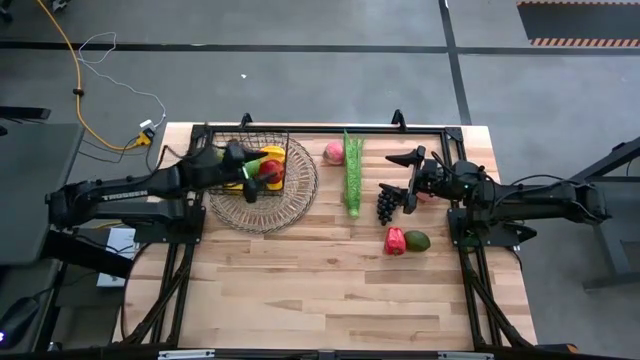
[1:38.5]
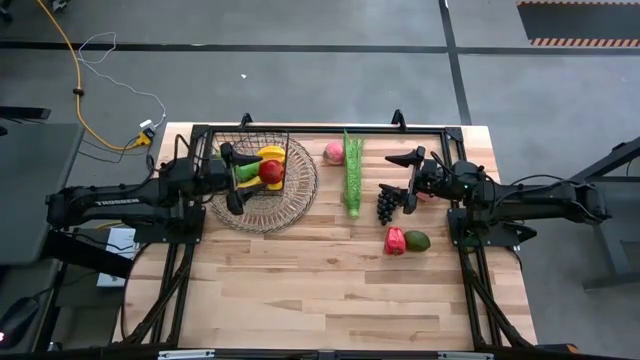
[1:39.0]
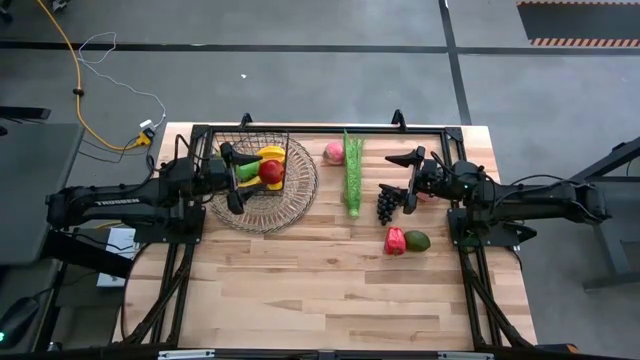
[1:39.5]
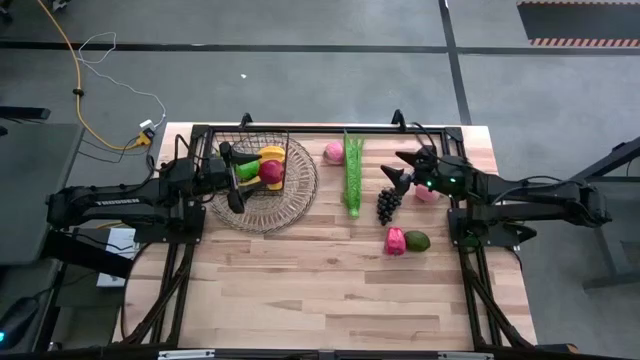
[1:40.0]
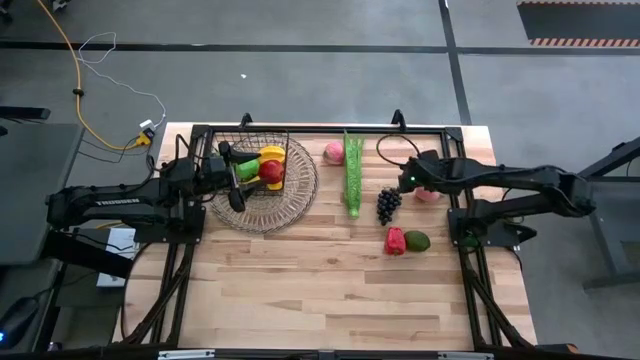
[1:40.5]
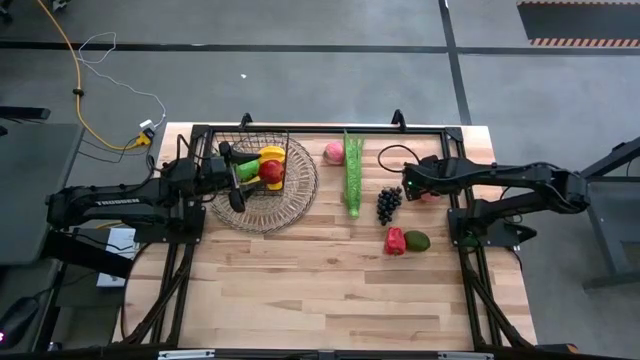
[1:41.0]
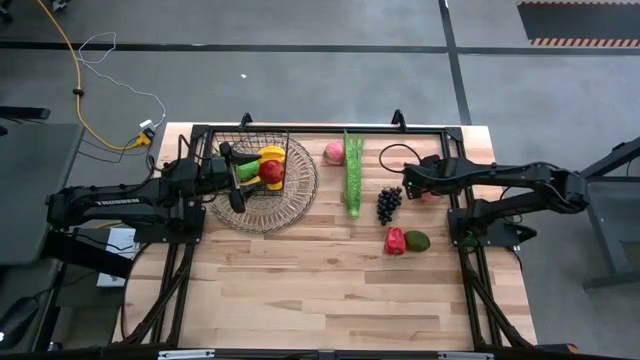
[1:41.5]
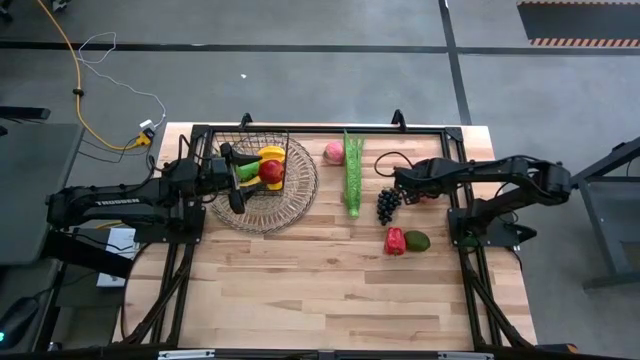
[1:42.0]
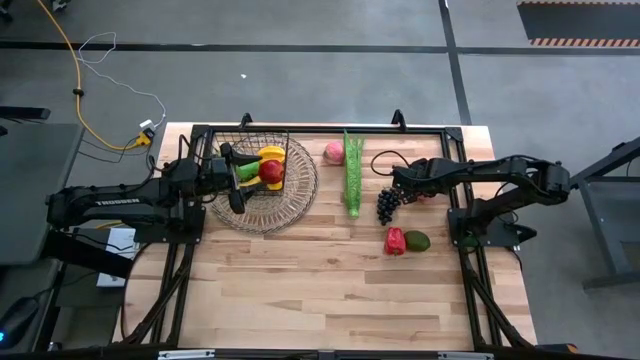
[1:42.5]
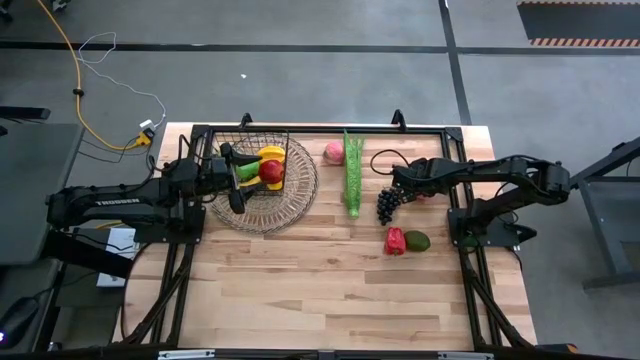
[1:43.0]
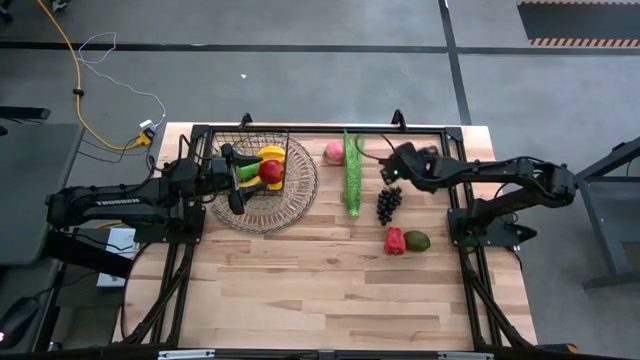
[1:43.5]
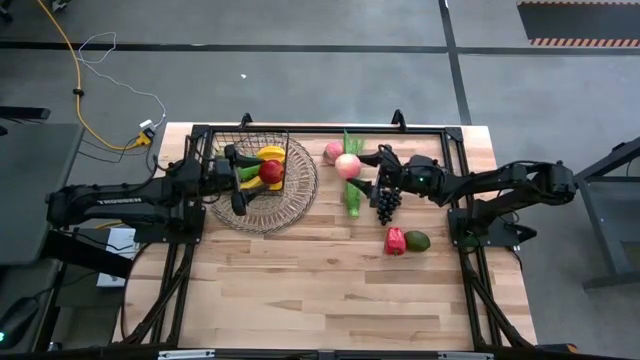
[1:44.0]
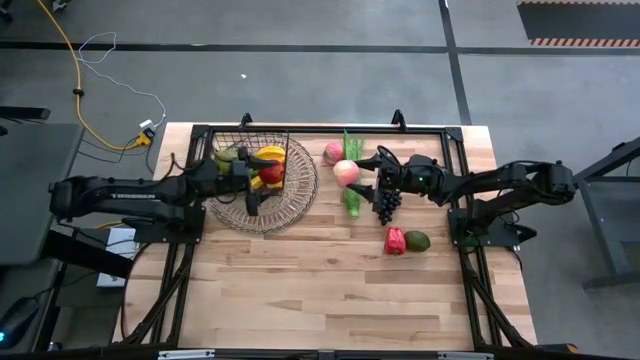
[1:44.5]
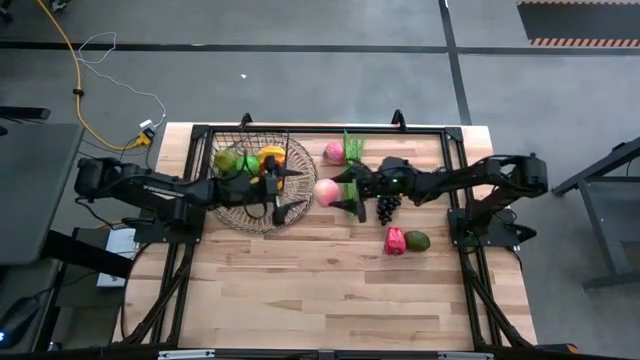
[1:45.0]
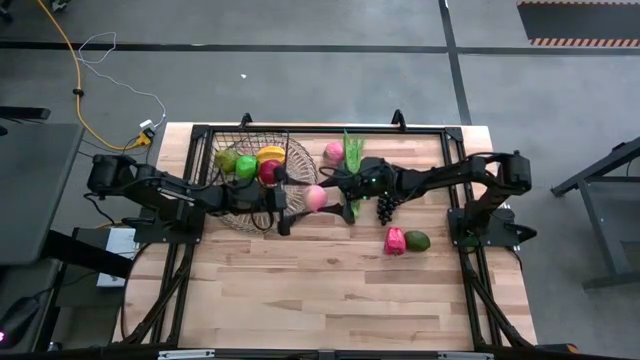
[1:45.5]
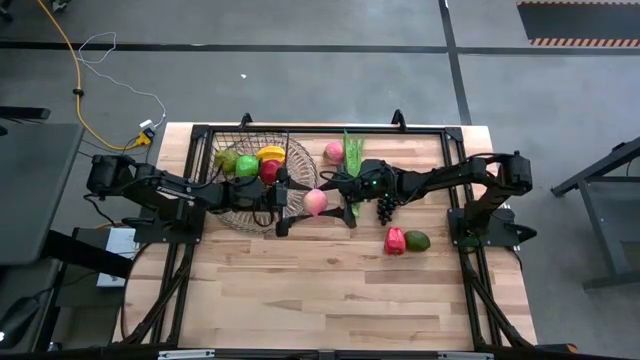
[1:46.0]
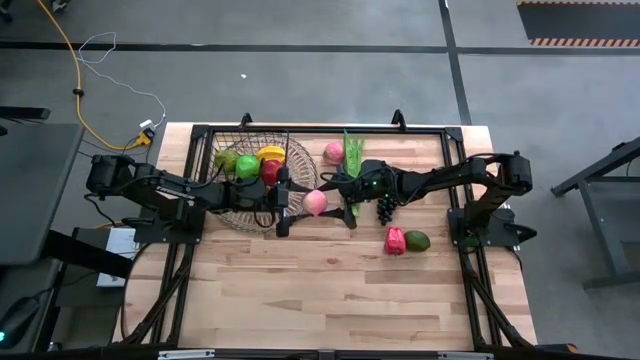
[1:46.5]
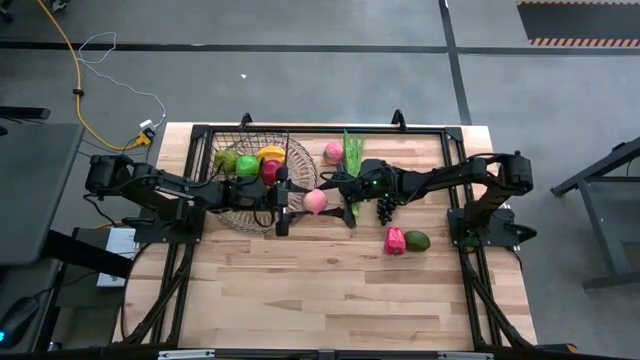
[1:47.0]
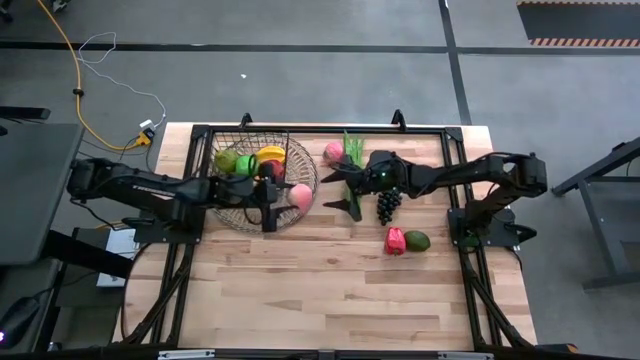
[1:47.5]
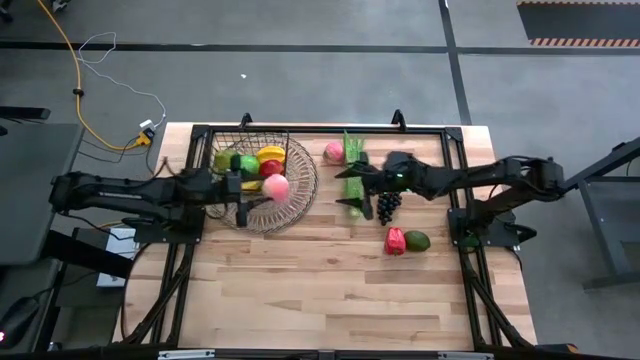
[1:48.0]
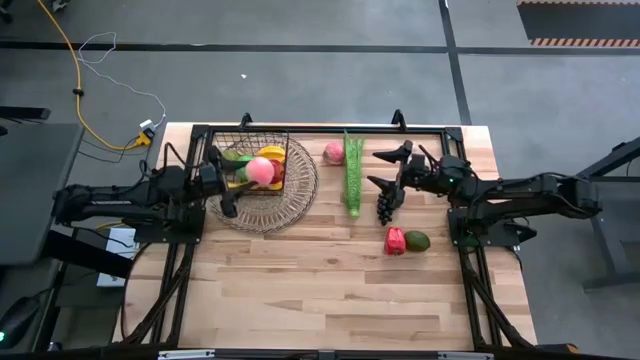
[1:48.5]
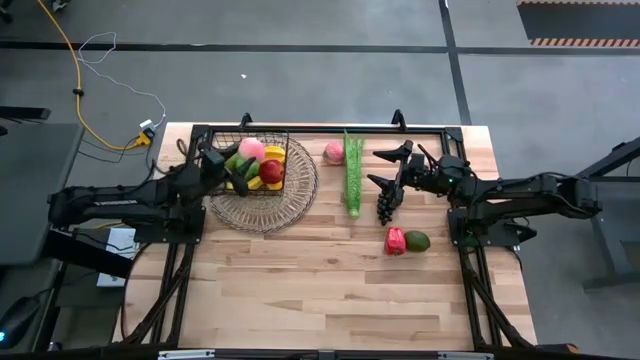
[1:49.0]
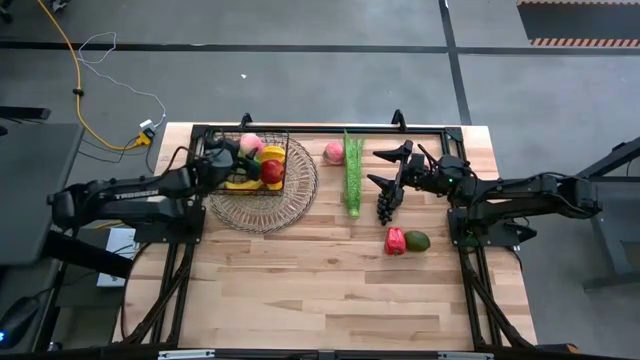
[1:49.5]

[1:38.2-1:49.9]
Task: Build produce basket
Put the bottom pink peach into the black wire basket

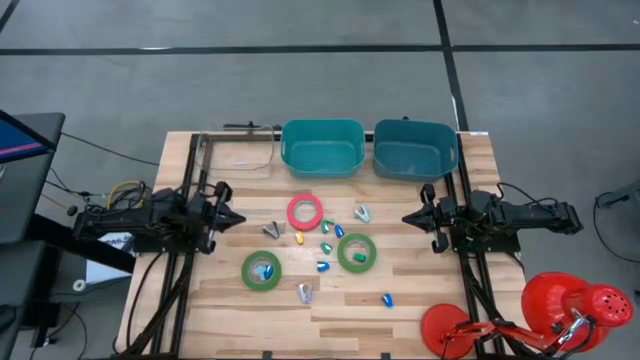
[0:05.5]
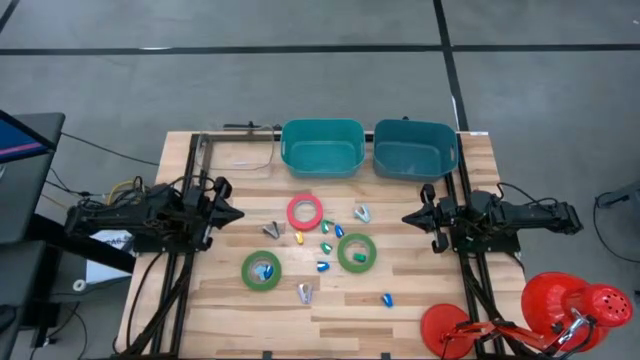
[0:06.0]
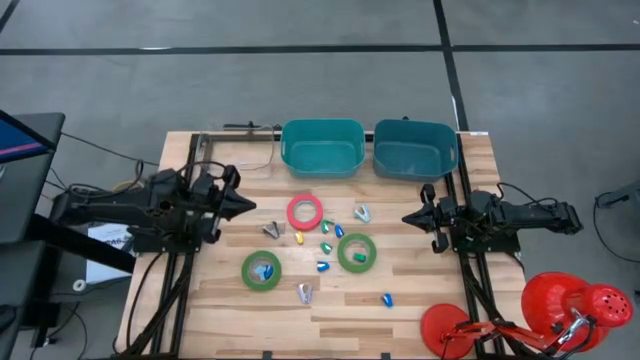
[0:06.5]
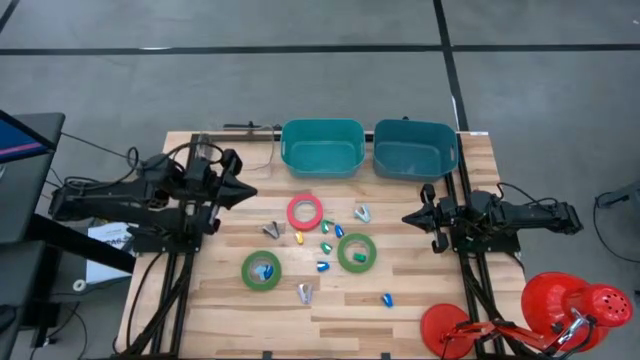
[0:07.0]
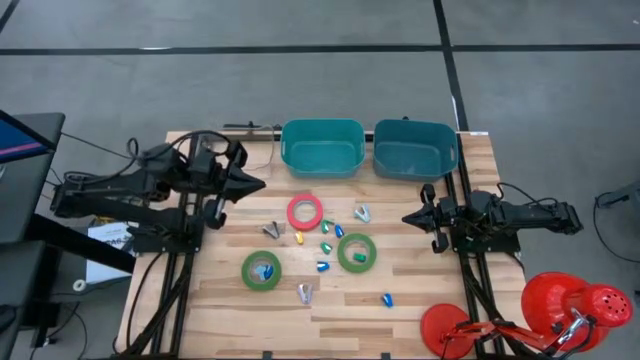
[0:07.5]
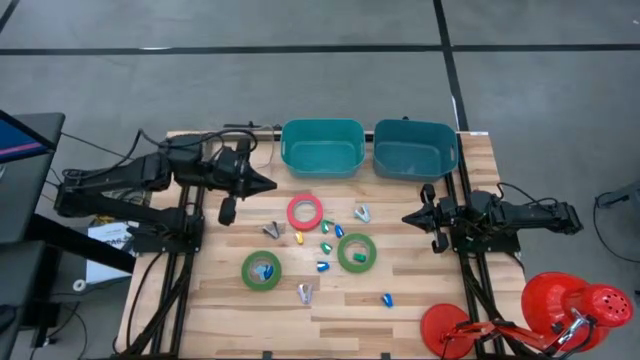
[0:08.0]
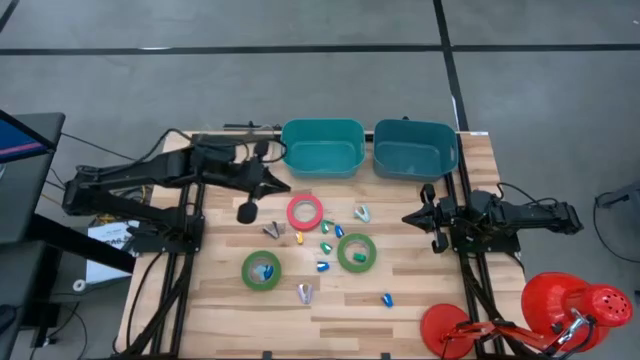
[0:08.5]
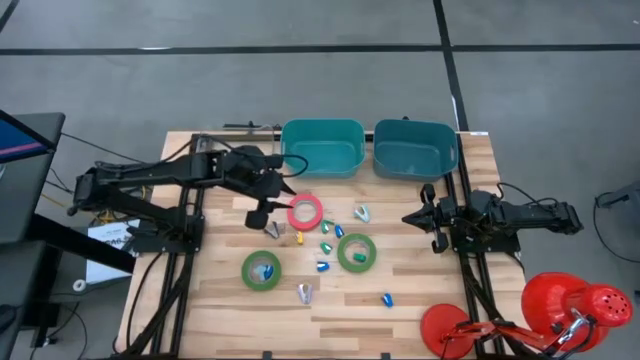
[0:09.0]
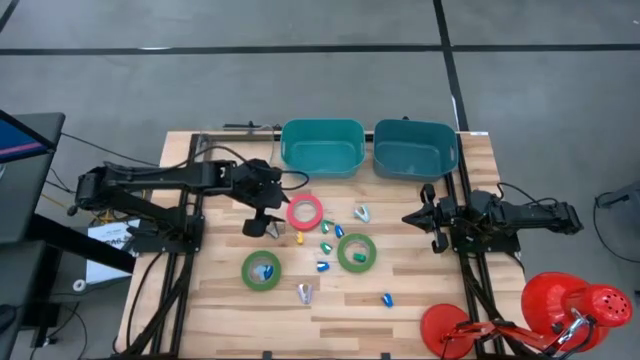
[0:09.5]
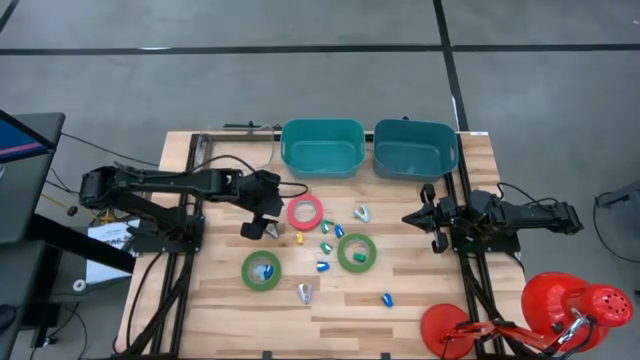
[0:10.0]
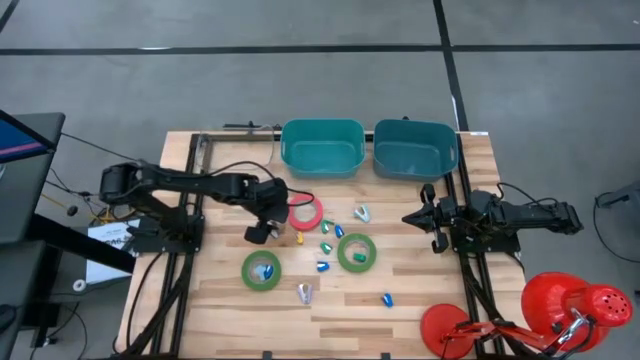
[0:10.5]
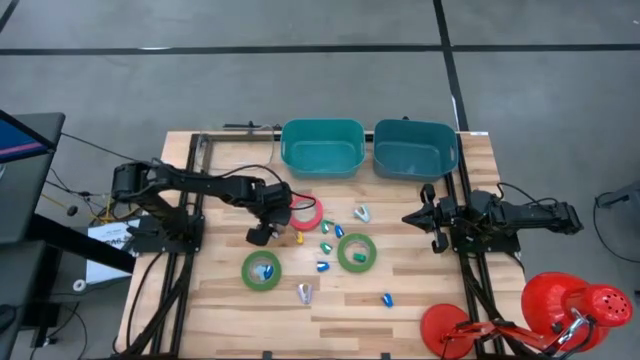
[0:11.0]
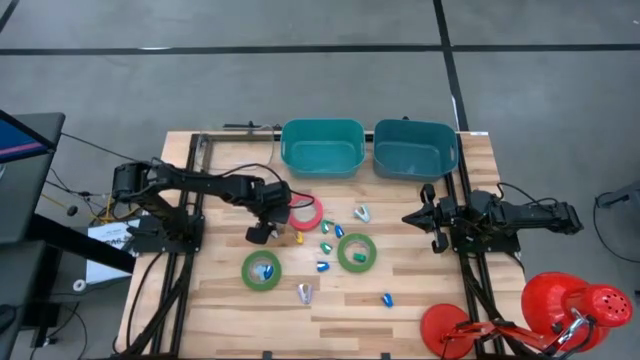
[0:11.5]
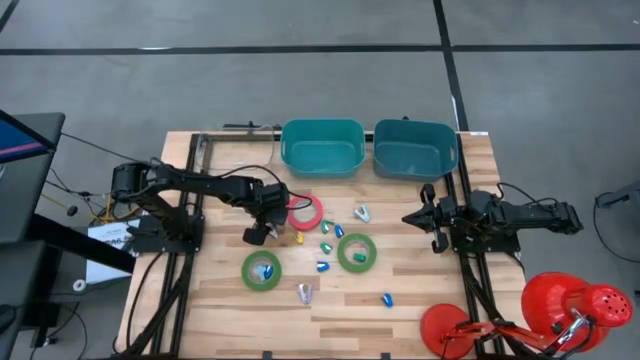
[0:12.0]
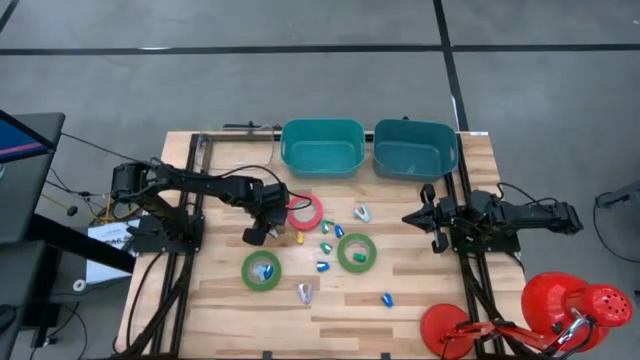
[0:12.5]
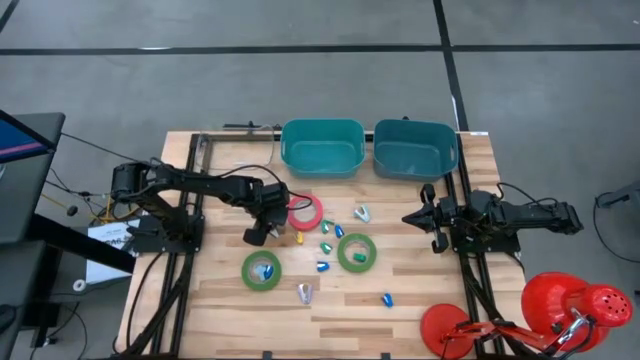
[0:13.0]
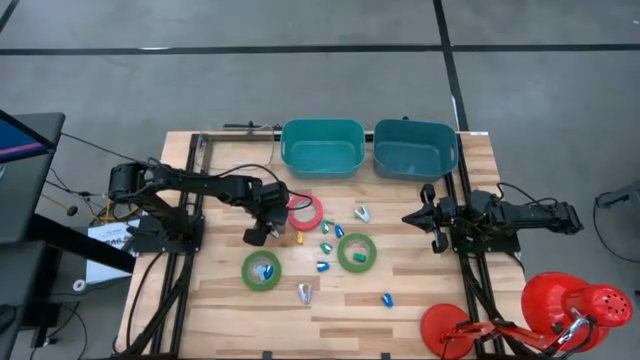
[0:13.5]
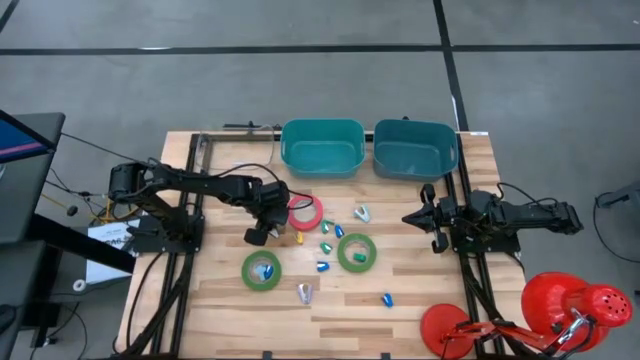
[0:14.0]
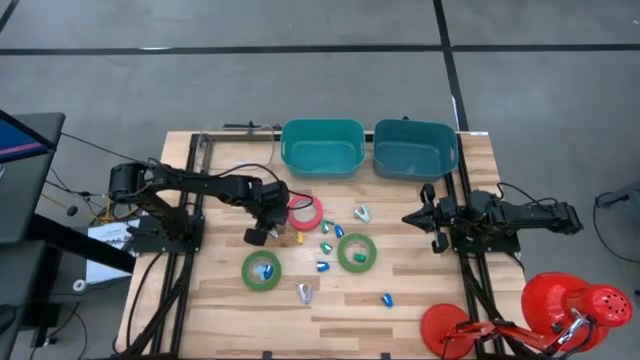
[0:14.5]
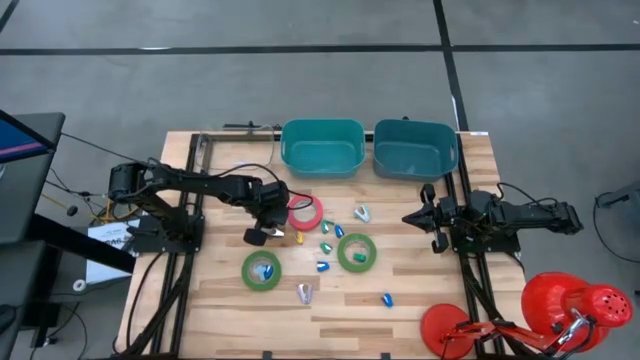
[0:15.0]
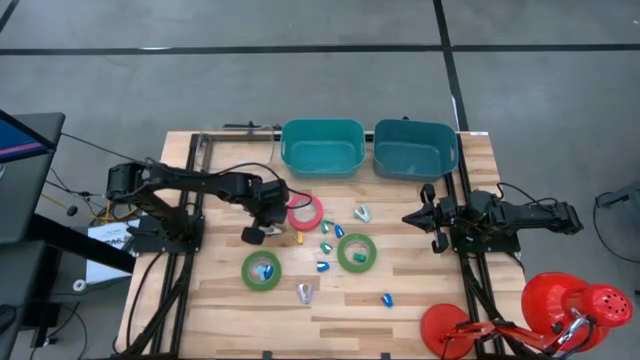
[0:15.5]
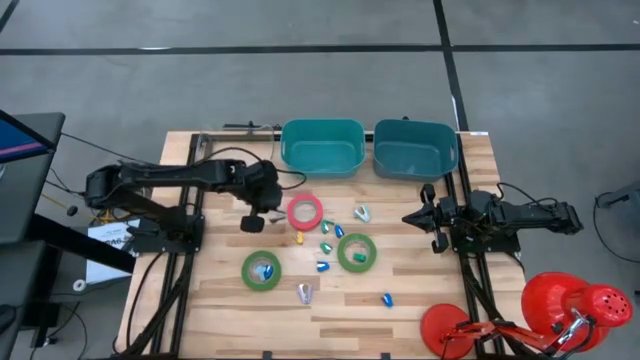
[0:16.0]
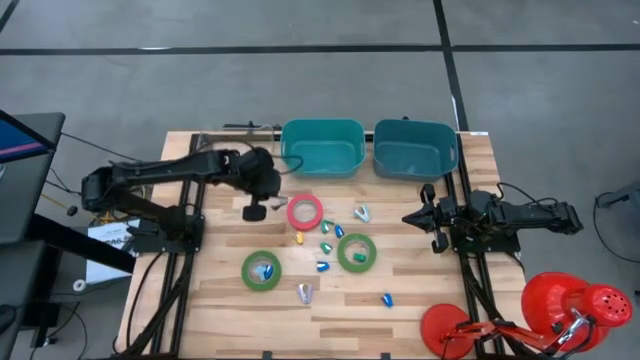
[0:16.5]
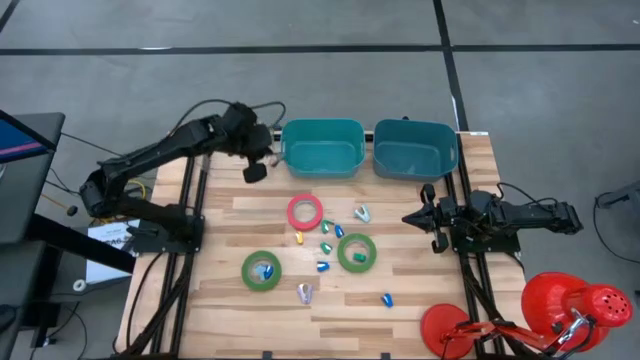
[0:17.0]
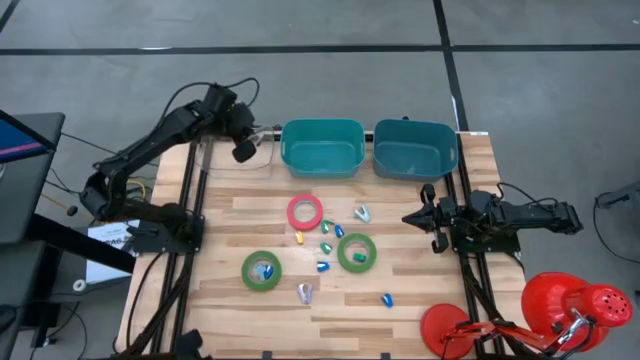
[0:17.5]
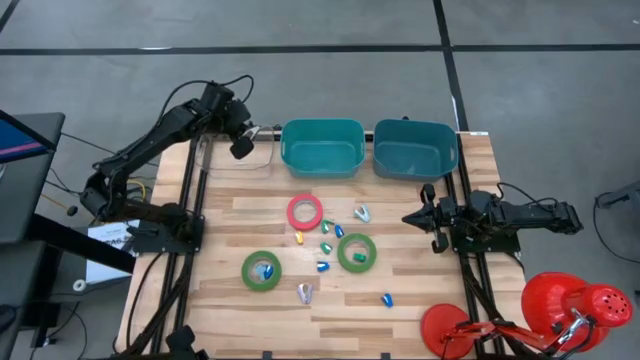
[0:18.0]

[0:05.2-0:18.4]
Task: Pick and place Stapler, Stapler remover, tape
Put the black staple remover into the transparent bin
